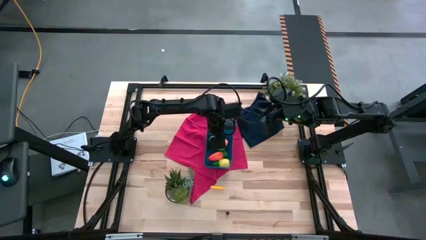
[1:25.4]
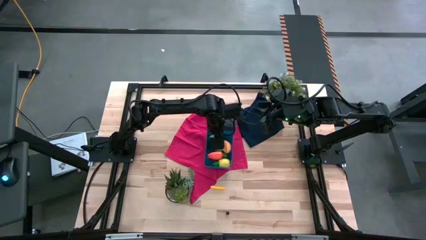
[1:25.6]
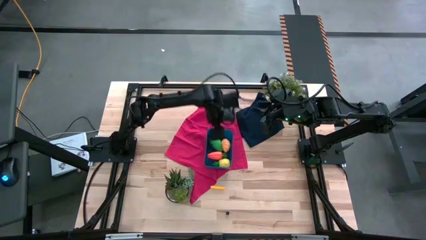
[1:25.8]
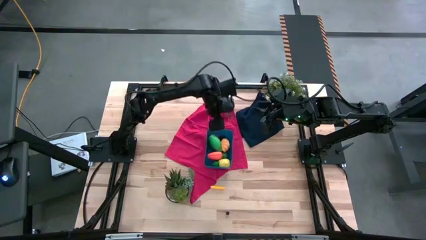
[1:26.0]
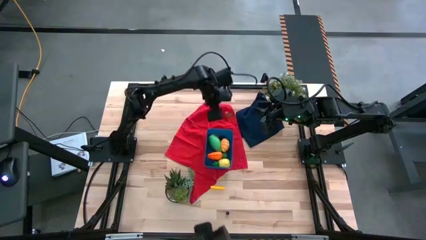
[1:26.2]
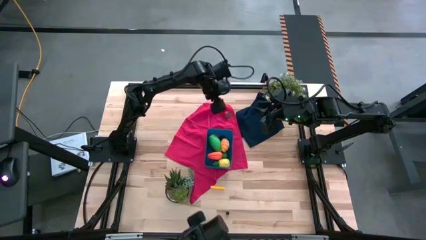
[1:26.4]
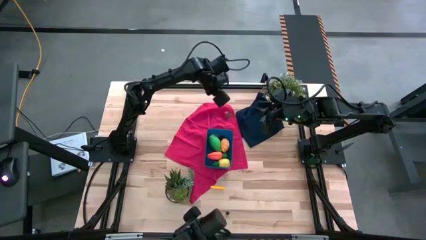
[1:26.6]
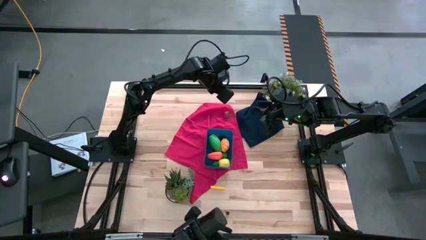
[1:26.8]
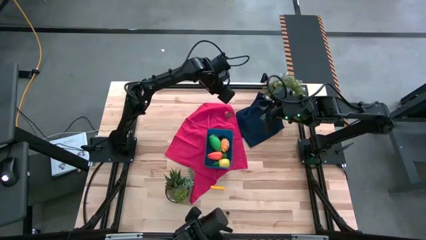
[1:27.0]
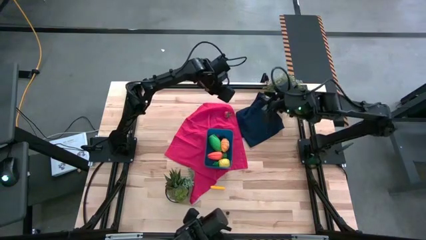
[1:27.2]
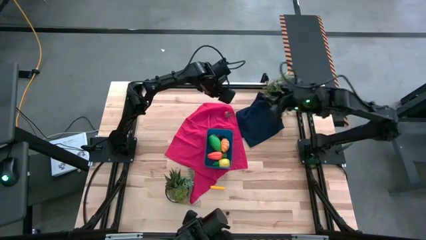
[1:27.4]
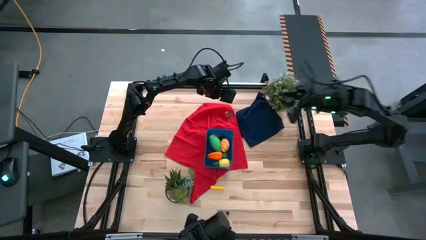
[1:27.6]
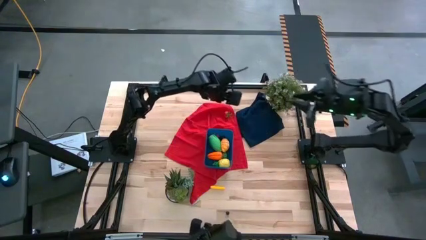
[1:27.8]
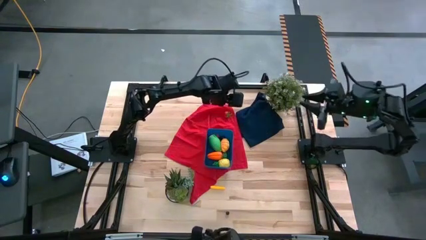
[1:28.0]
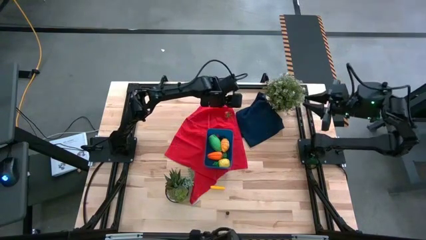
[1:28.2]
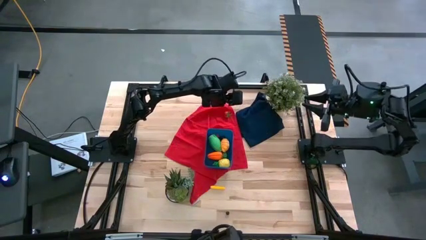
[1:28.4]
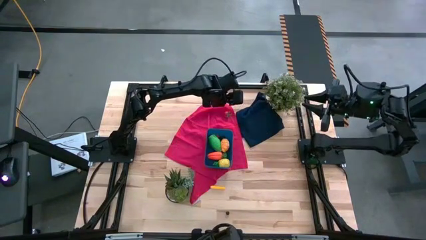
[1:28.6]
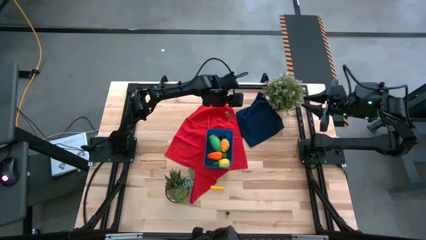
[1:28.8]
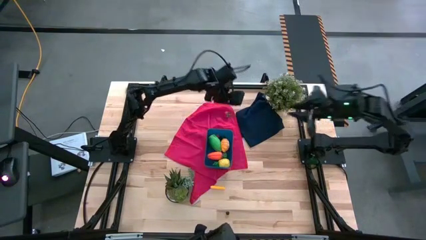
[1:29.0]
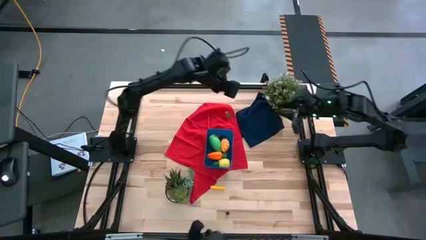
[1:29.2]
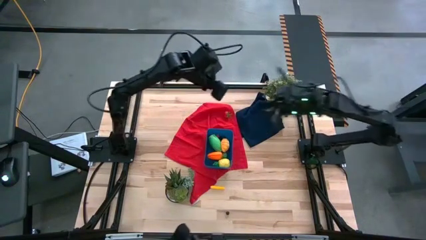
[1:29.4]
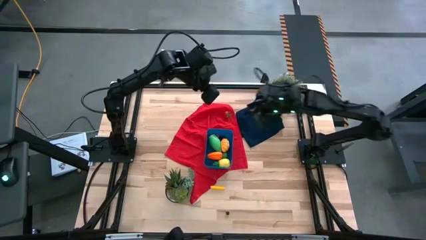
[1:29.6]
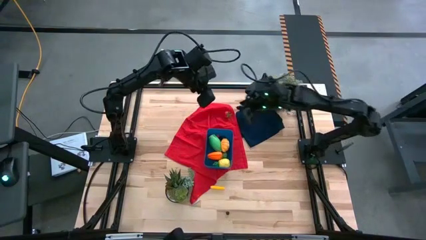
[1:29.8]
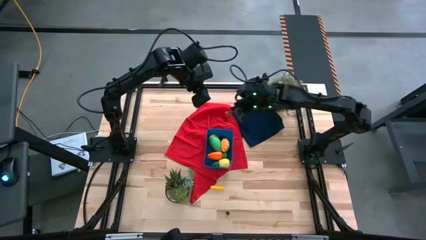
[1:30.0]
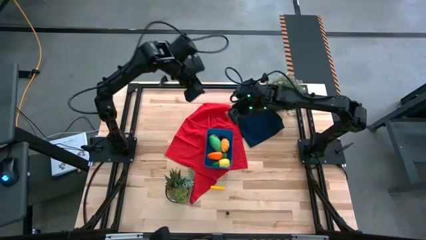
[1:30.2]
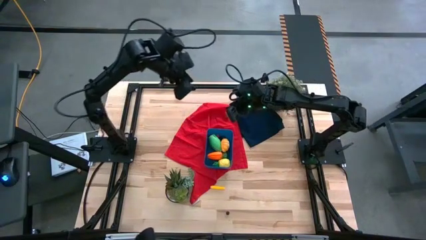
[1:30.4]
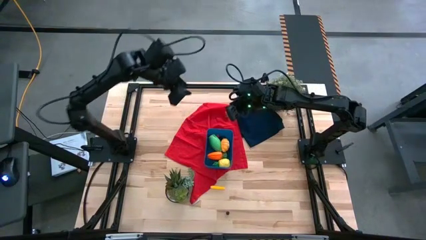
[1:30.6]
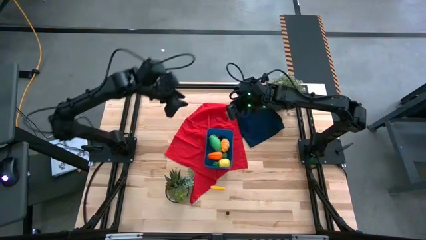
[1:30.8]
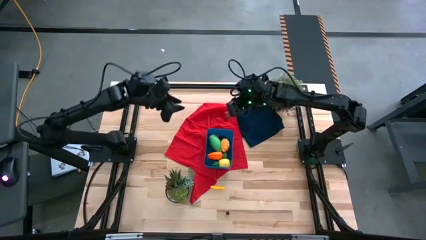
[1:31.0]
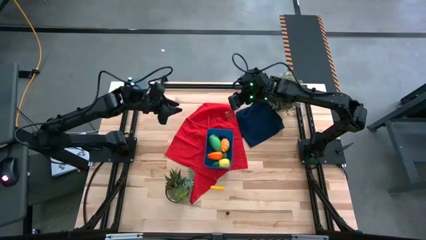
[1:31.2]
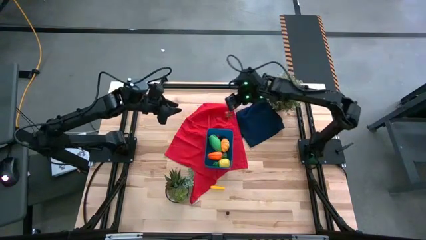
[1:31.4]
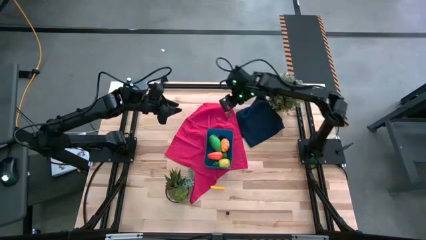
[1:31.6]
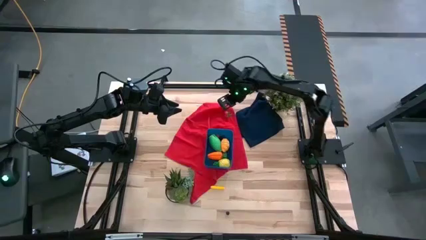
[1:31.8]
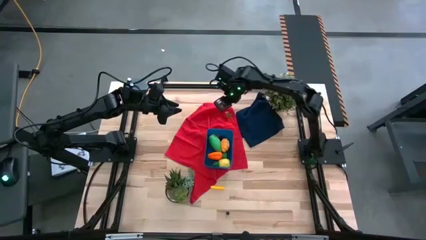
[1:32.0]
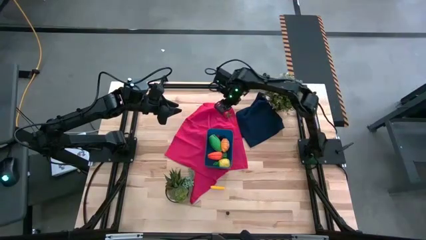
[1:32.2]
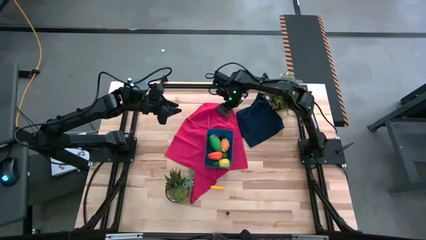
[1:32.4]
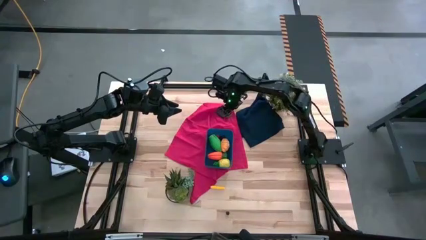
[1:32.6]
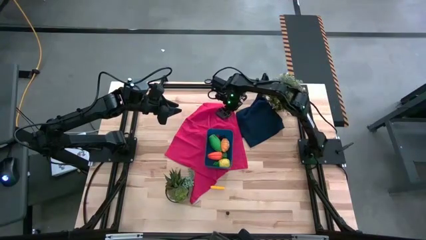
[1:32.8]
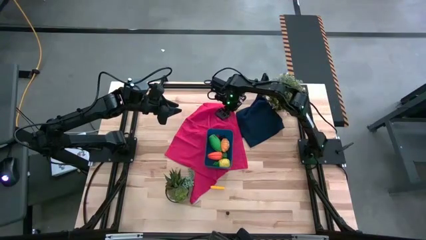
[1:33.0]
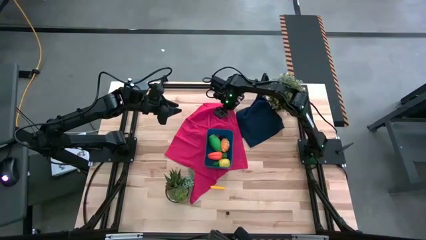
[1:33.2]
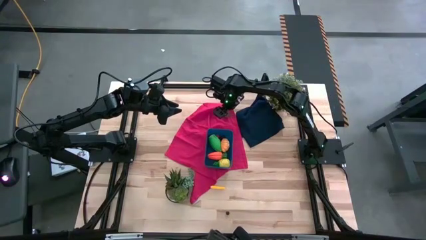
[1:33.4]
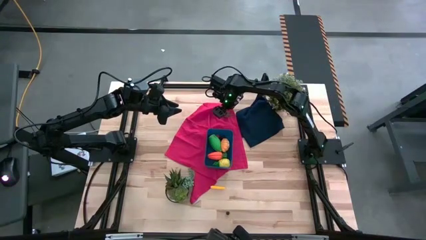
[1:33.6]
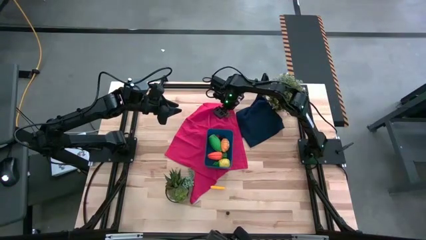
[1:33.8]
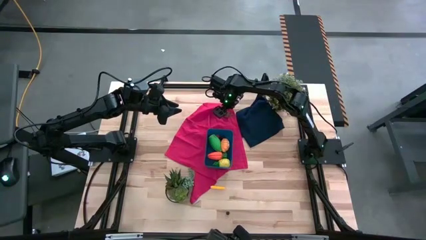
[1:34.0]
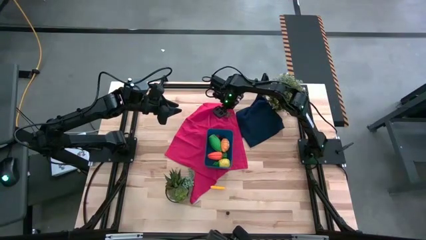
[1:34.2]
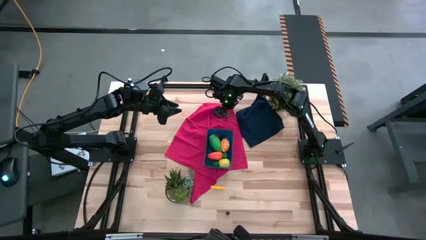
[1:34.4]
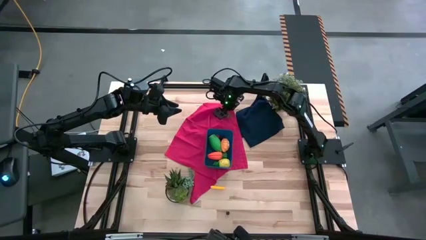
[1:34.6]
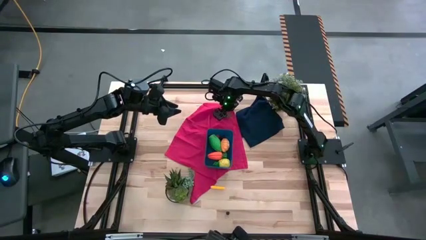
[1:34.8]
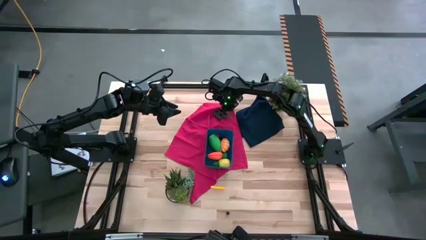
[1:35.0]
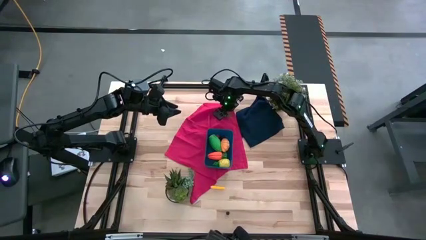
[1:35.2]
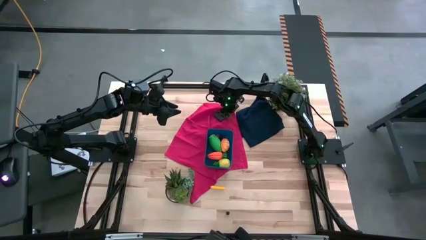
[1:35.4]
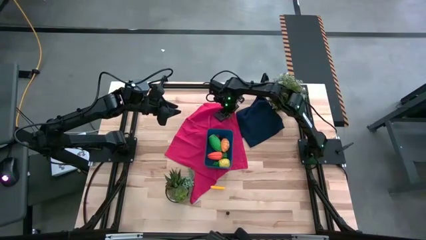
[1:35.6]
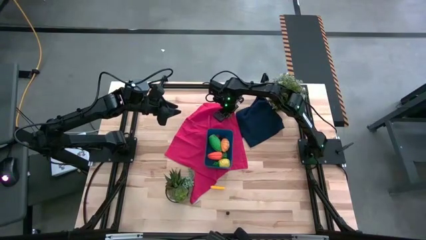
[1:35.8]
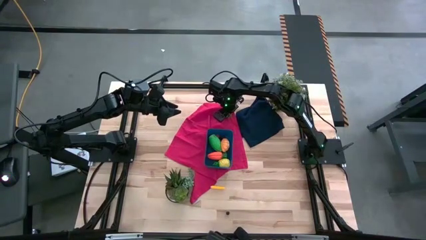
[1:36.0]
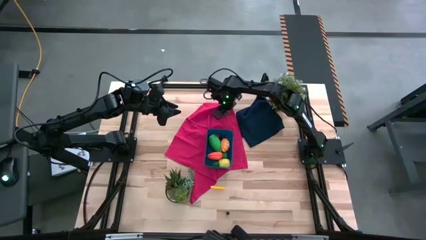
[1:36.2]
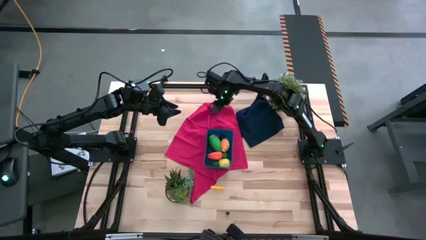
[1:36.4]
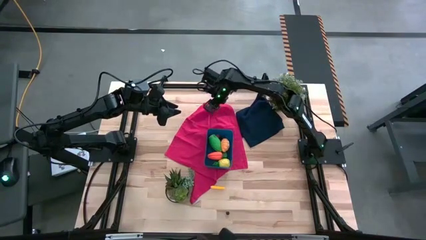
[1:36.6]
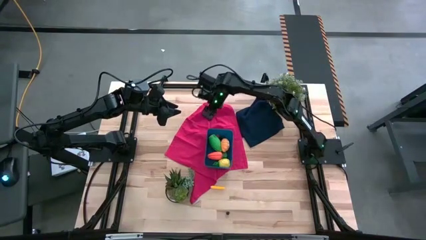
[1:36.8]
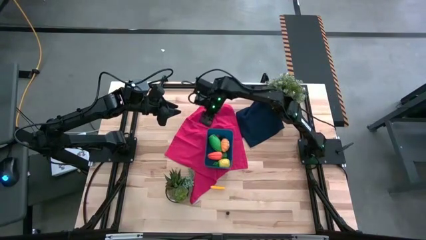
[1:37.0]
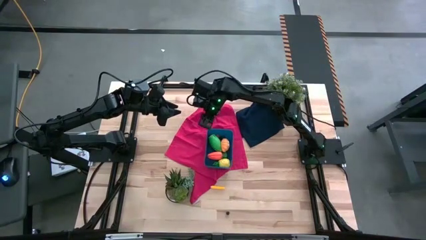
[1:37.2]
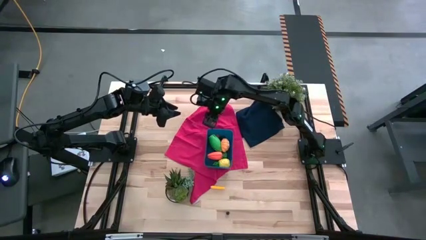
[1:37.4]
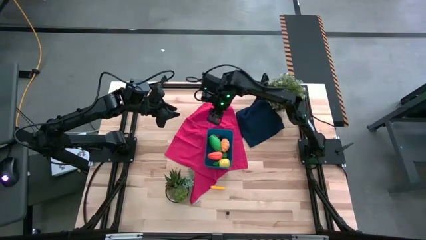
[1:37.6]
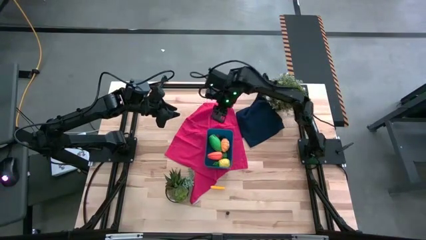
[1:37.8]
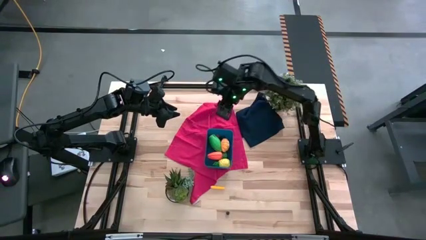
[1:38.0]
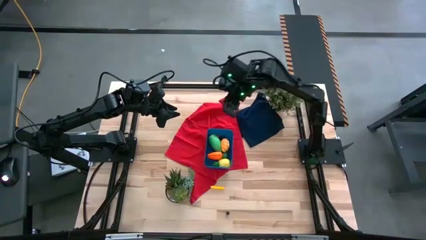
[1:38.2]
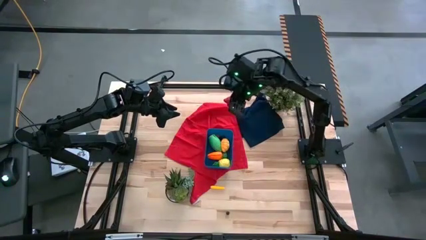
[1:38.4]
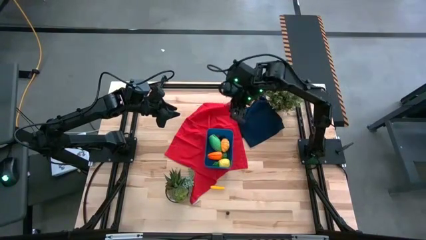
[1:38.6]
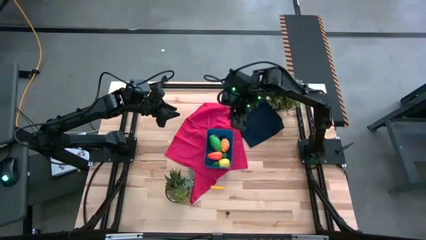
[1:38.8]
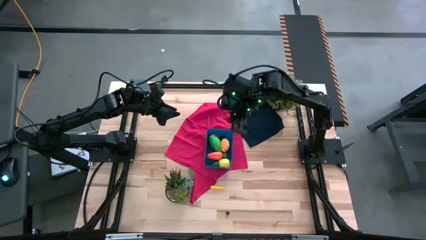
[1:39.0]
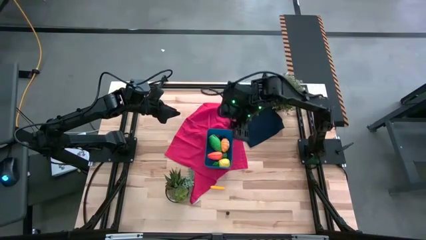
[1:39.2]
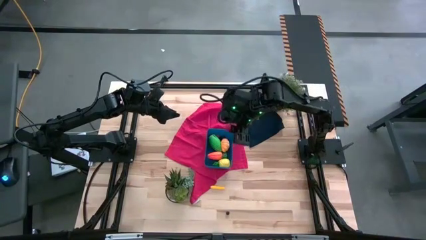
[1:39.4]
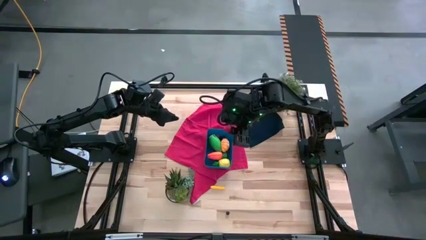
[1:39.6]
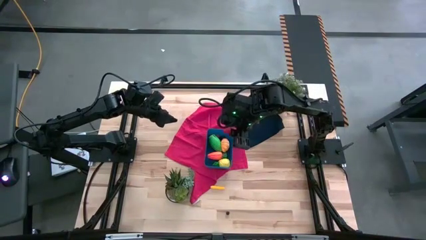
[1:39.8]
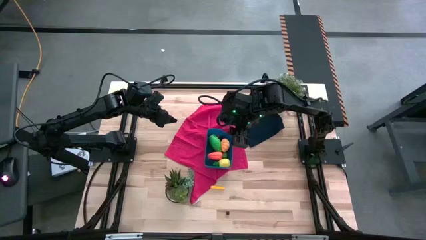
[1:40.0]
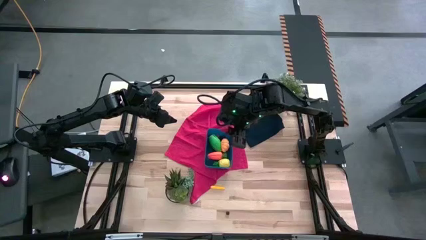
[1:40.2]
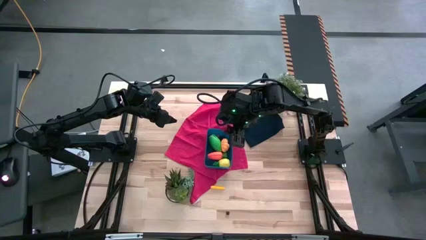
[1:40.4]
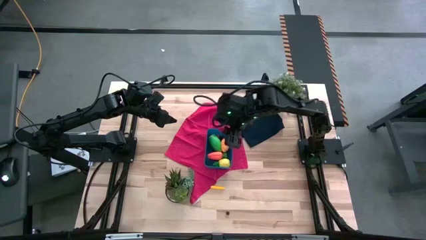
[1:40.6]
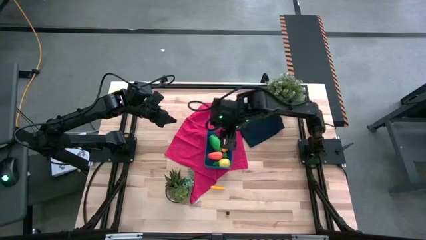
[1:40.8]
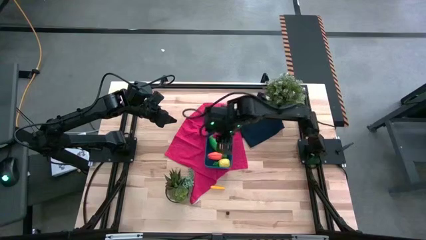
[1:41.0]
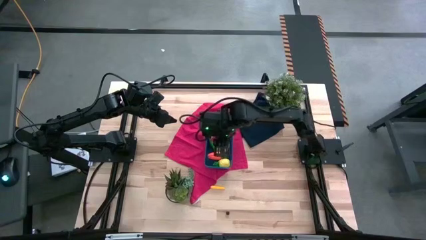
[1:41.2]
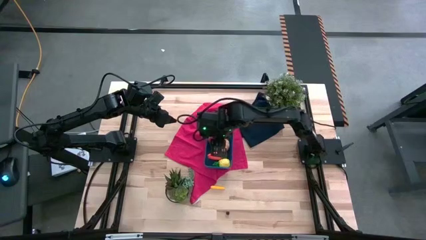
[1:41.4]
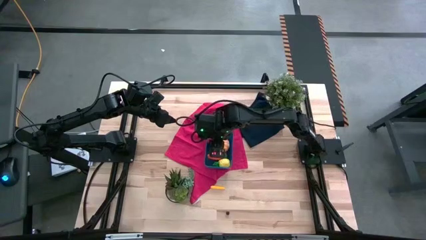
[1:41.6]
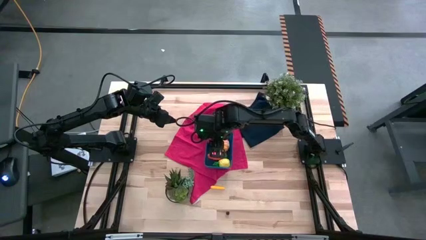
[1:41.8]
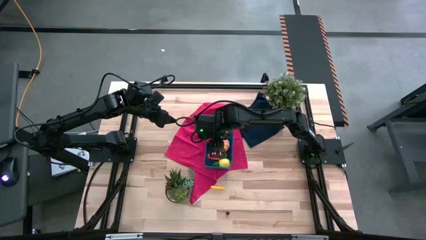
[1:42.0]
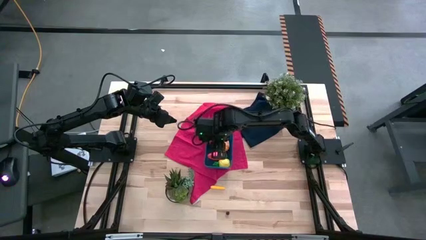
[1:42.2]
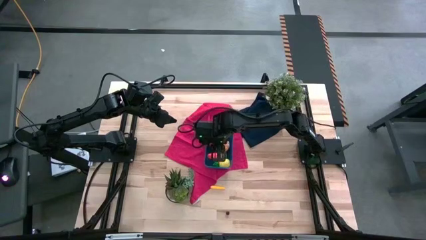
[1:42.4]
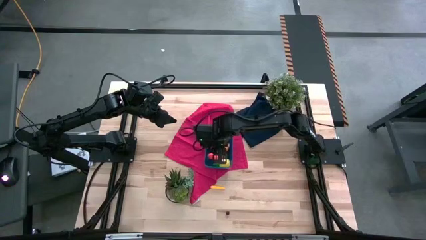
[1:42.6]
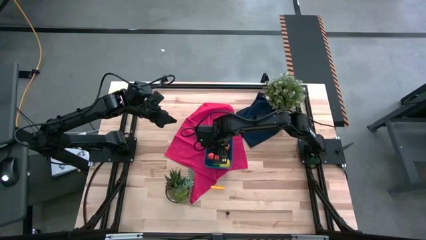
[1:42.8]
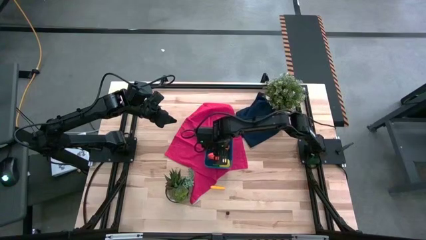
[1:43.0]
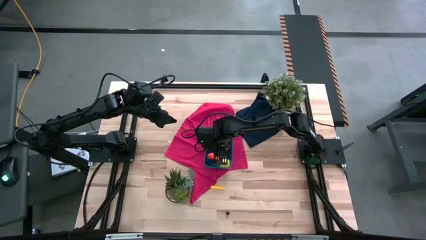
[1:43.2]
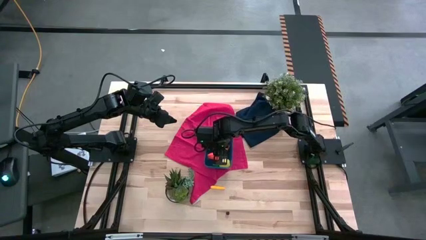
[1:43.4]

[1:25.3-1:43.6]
Task: Pick and placing Produce into tupperware
Put the strawberry into the blue bin
